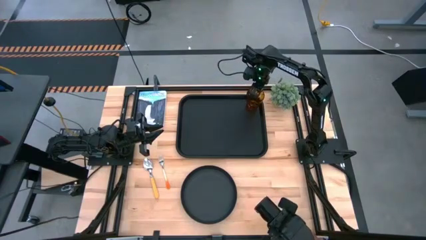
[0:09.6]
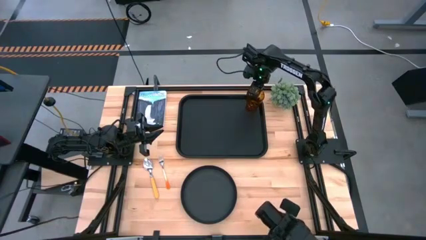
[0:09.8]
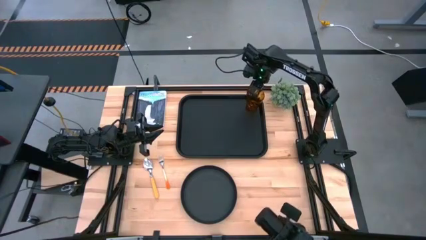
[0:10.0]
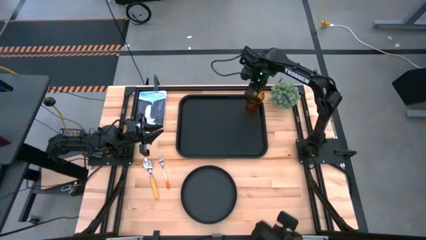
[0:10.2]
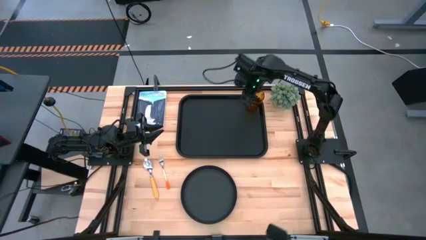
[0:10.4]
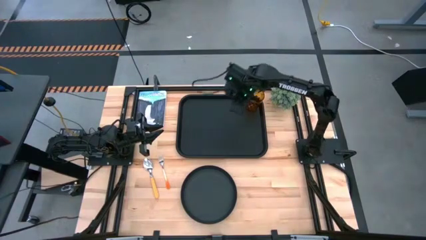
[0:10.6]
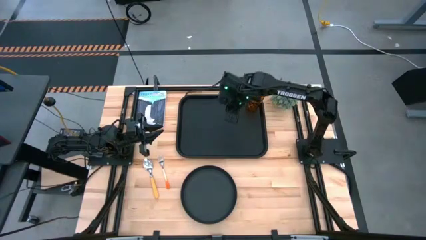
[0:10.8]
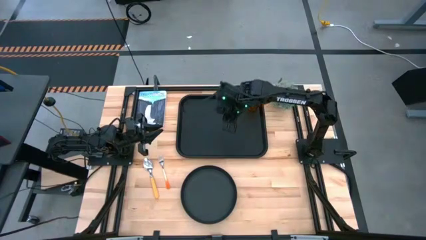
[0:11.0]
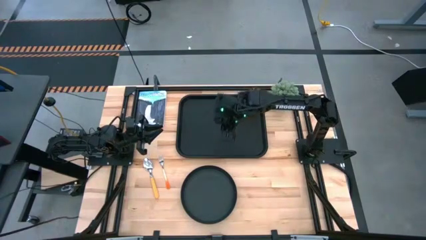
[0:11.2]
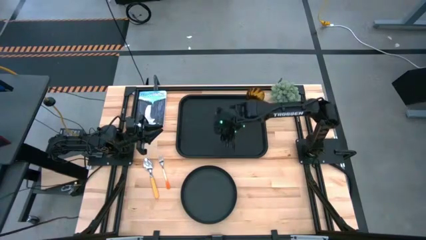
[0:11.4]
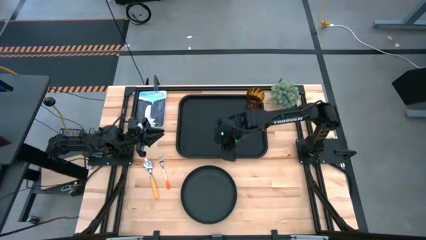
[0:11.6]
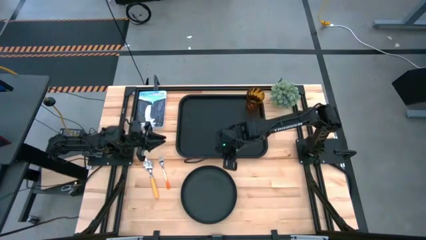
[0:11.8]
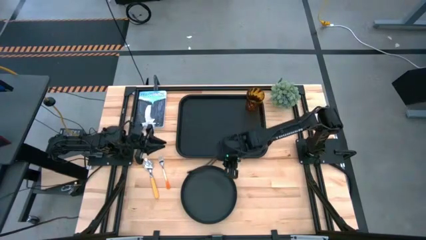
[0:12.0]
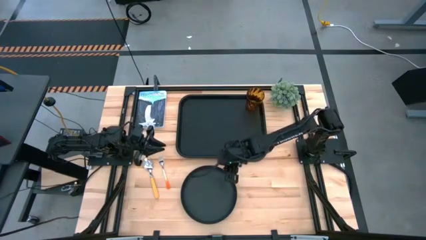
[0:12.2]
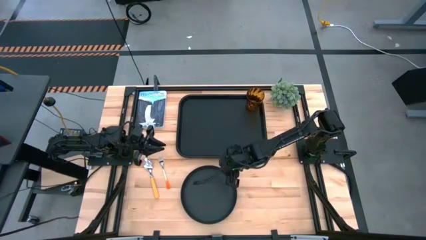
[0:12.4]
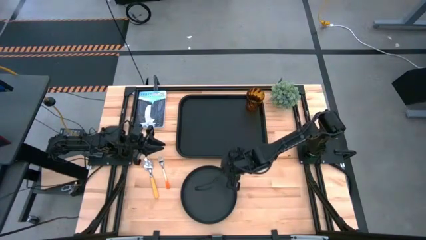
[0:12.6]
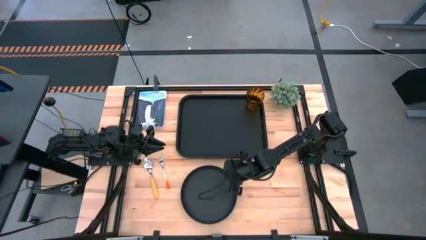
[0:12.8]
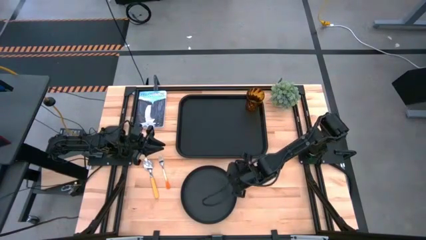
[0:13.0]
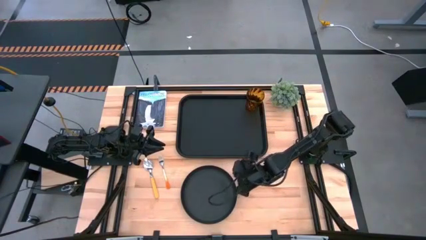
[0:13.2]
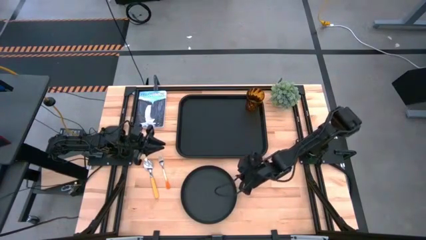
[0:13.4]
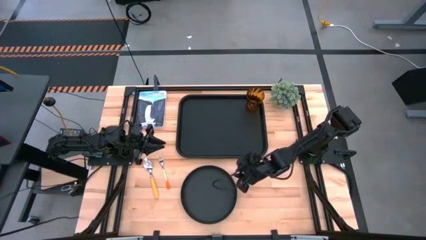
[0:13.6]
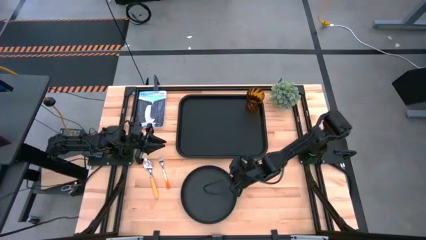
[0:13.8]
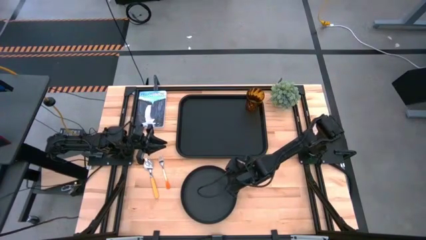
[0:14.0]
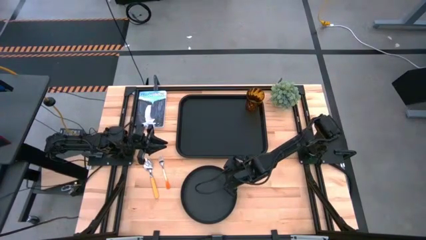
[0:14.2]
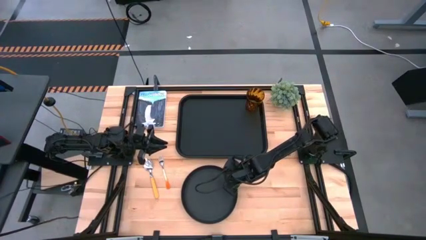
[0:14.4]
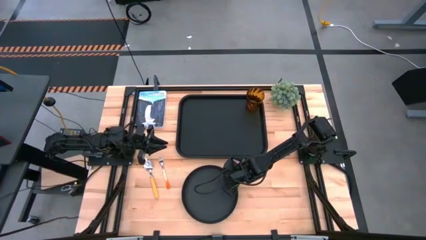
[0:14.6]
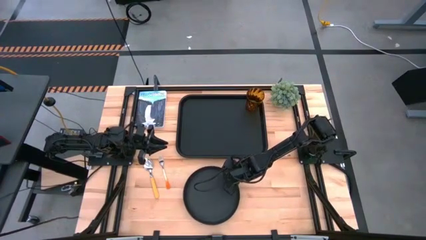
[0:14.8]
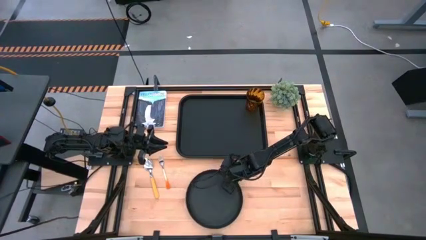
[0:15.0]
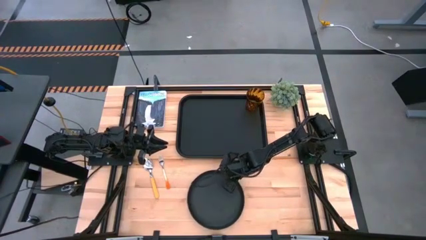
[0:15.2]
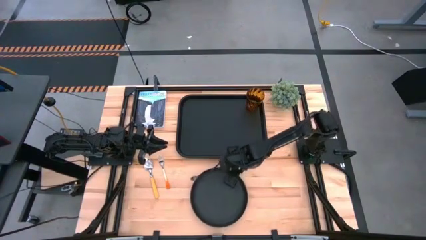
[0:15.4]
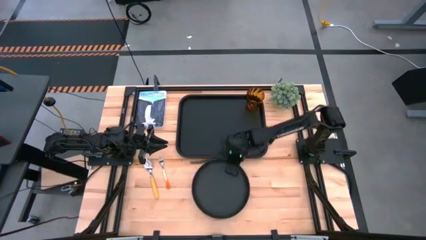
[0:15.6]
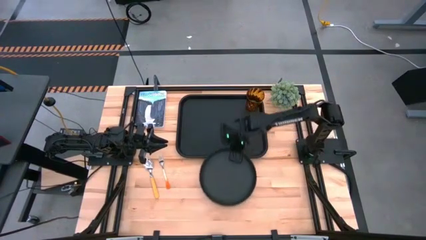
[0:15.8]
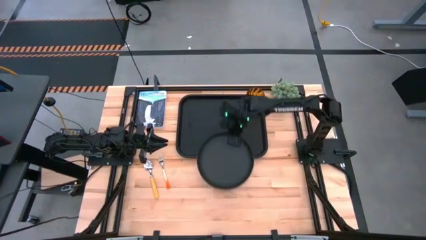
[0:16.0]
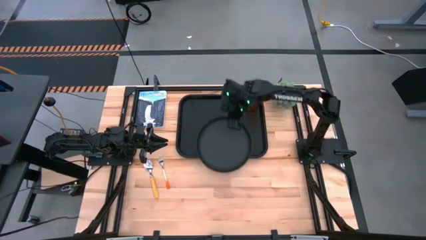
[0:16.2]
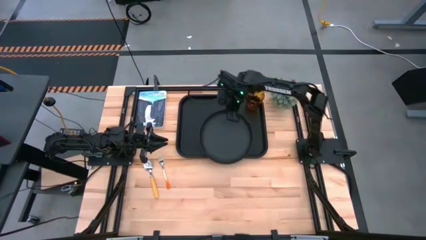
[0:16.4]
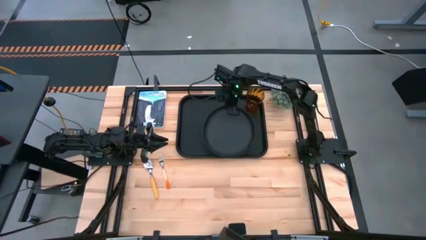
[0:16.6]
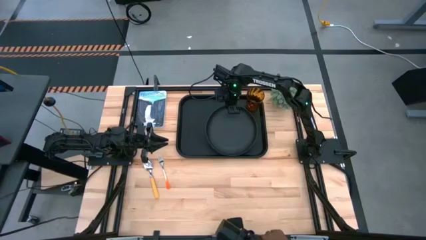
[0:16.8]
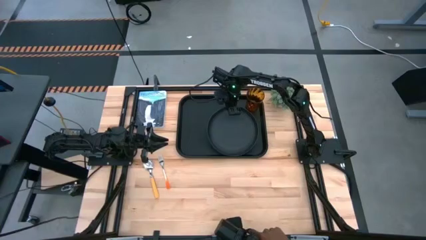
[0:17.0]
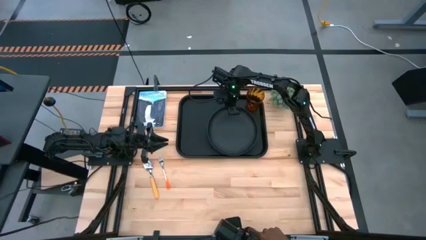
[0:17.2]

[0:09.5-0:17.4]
Task: Pick and place plate/cup/fork/spoon on tray
Put the black plate on the black serving tray to the bottom left of the brown glass

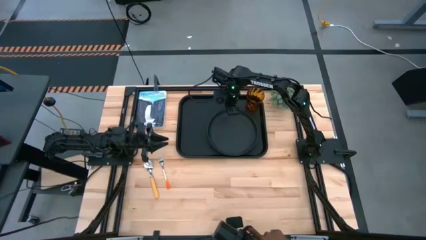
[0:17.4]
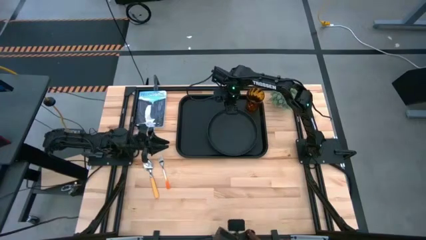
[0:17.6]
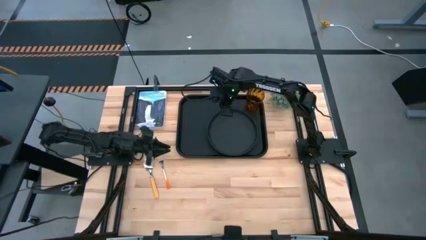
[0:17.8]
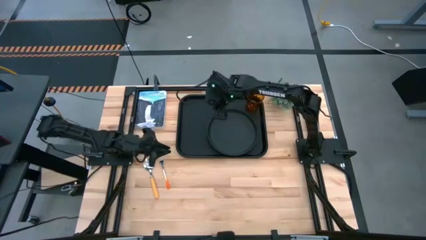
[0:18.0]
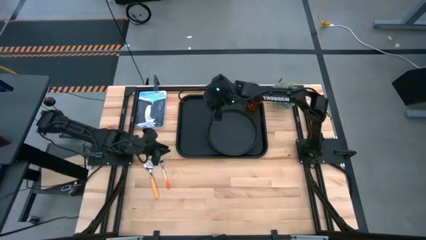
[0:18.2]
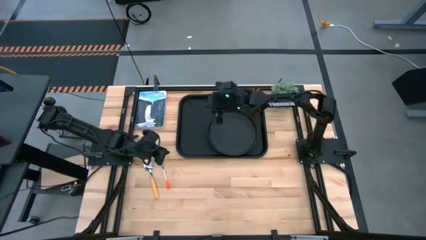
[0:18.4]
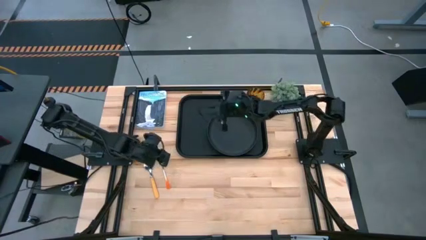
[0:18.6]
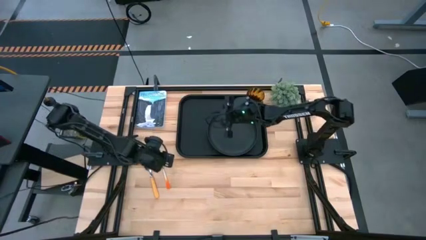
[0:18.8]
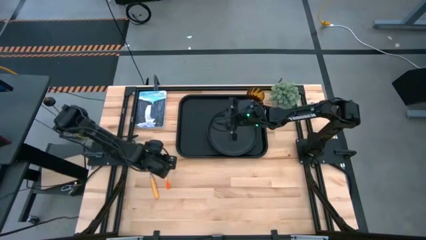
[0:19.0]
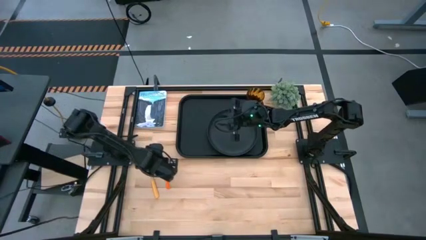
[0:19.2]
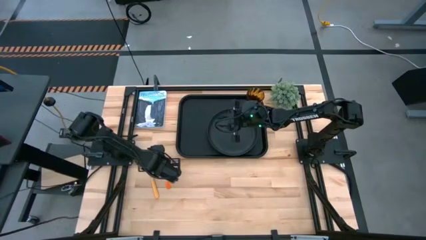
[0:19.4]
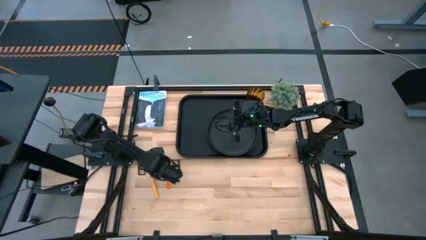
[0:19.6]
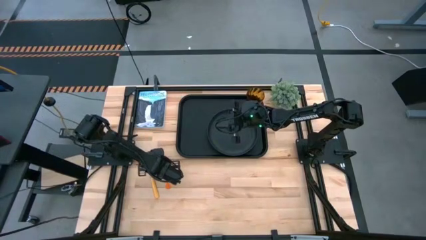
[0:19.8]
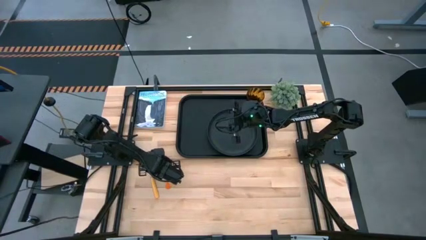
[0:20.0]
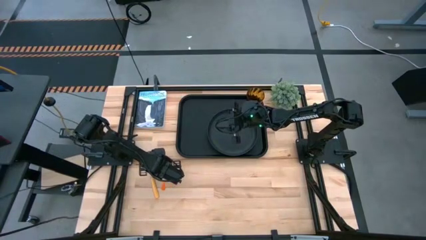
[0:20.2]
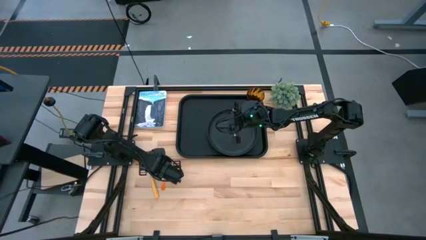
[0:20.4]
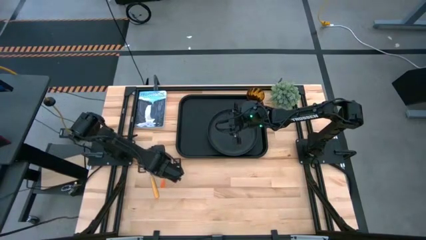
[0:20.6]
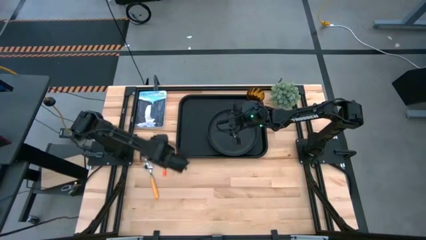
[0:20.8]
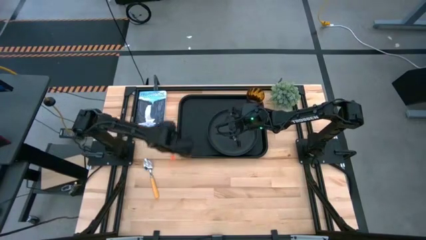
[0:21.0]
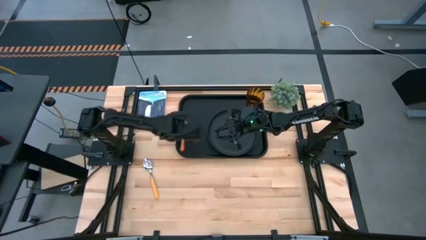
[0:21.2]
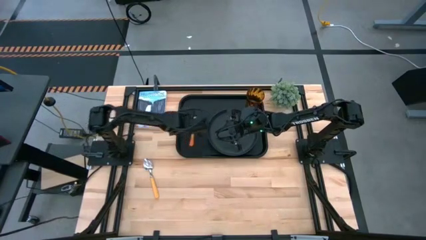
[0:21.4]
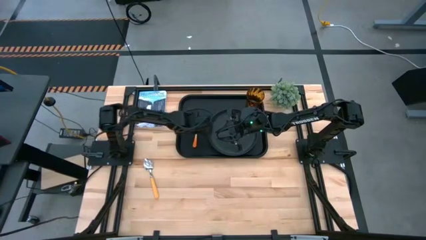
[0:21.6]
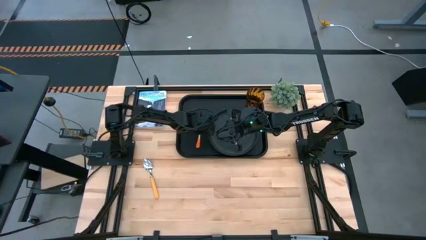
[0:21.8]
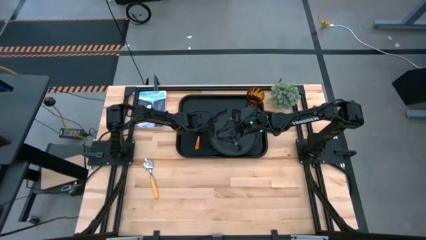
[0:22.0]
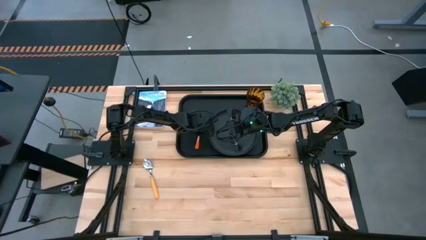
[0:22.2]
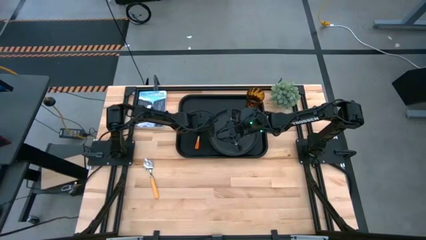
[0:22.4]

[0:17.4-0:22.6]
Put the orange fork on the black serving tray to the left of the black plate

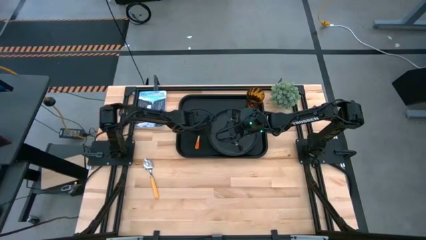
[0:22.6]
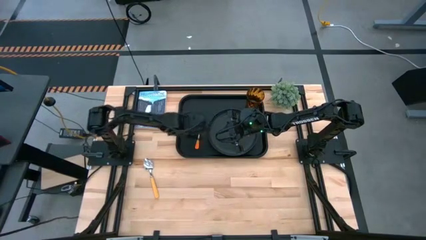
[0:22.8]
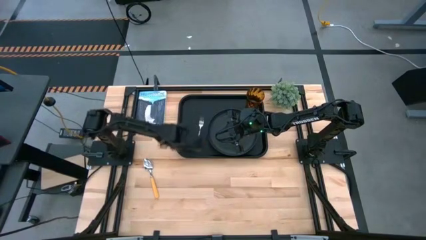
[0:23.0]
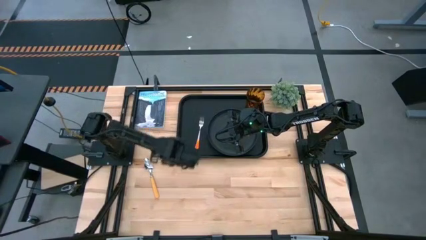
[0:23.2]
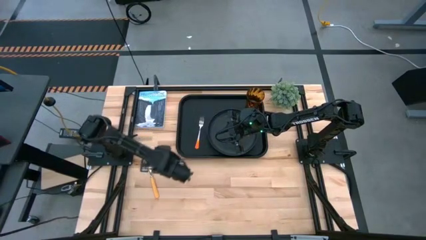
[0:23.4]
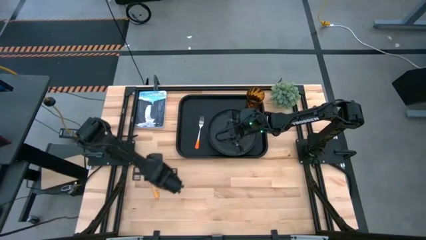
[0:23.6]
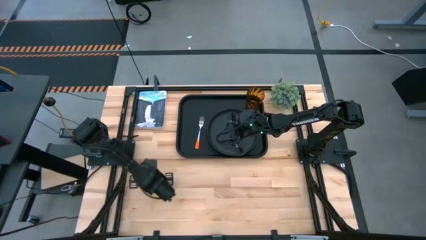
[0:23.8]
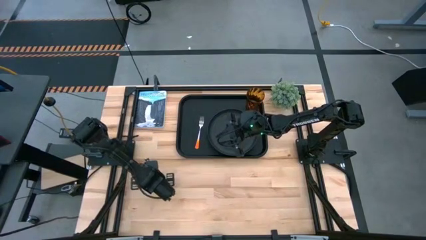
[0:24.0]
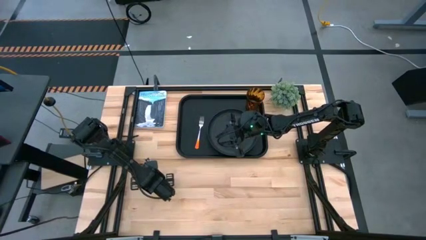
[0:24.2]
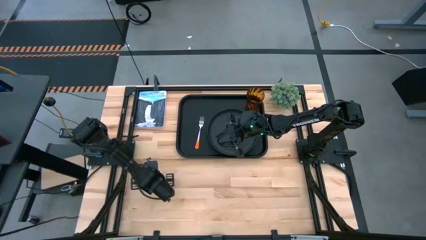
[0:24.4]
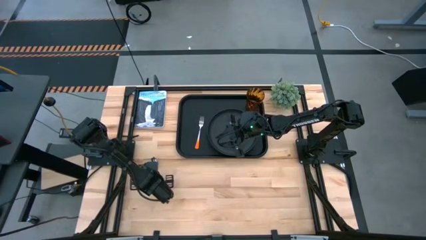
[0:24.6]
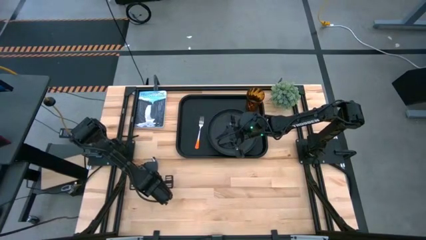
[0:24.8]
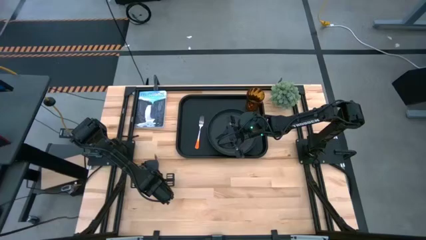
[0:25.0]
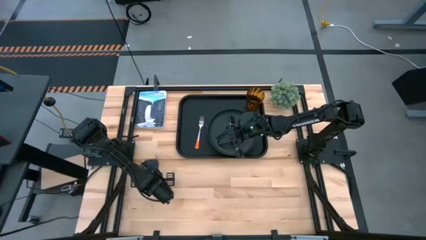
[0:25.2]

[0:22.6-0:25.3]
Put the yellow spoon on the black serving tray to the left of the orange fork

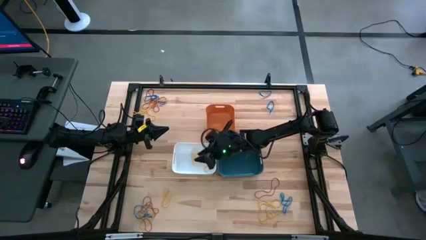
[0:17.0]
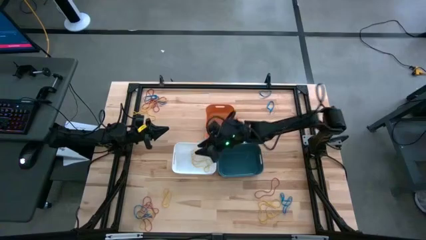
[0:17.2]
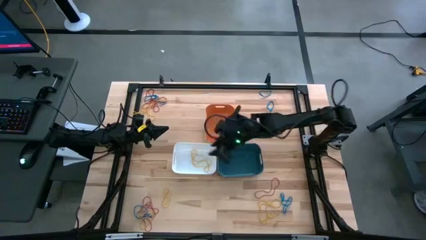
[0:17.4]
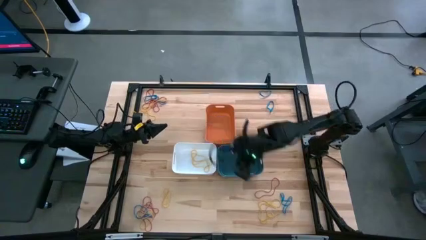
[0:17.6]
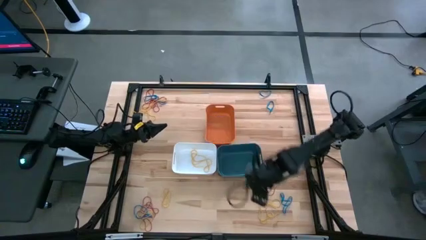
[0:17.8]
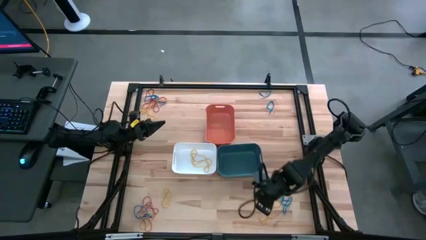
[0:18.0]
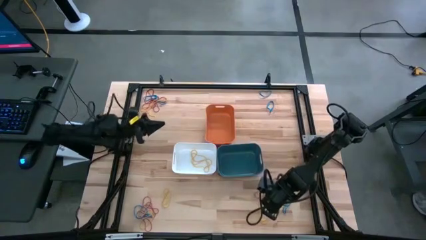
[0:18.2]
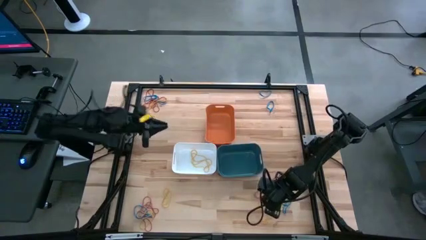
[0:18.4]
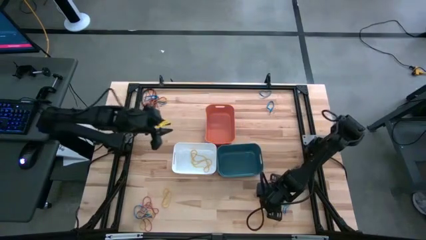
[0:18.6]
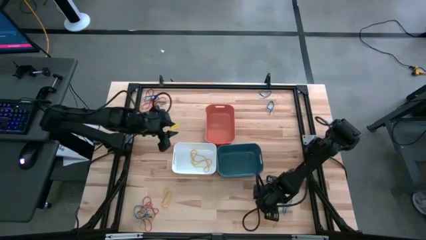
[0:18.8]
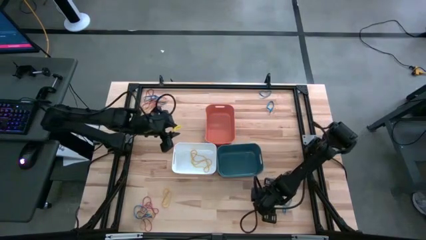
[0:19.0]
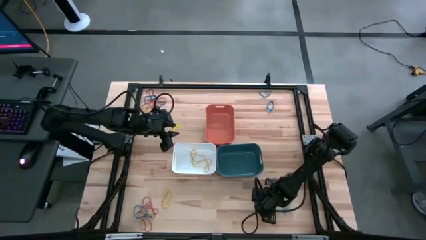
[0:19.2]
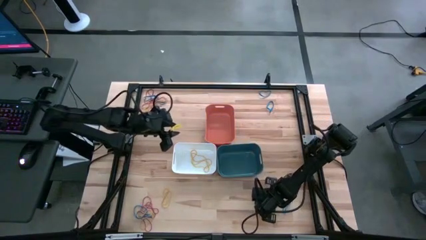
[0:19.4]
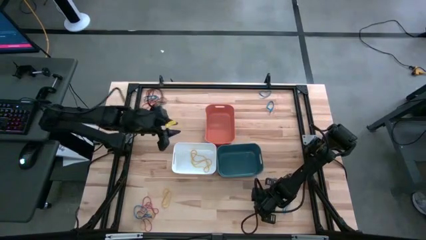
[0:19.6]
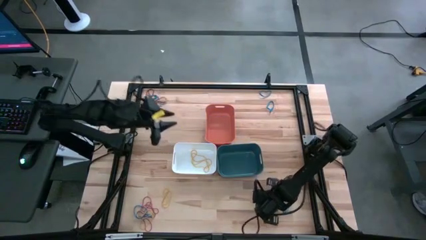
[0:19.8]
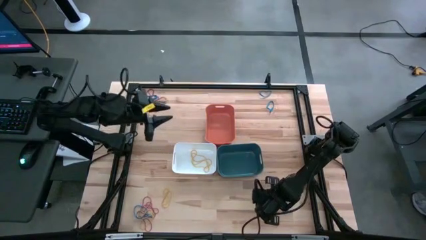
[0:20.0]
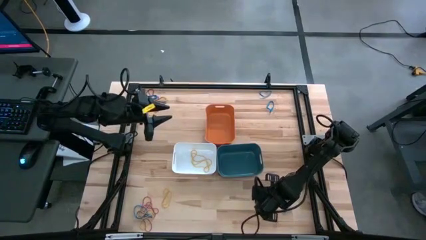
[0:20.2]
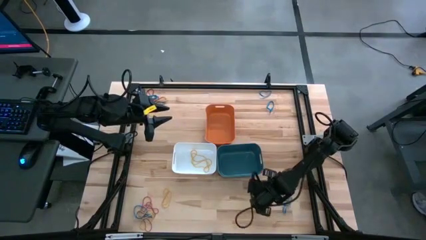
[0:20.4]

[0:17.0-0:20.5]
Task: Sort rubber bands into baskets
Put the yellow rubber band into the white bin
